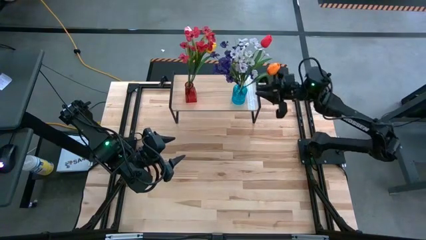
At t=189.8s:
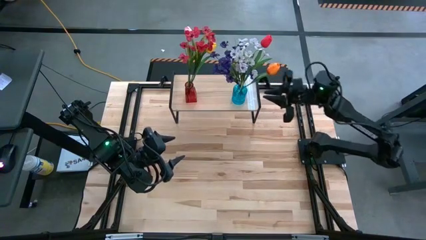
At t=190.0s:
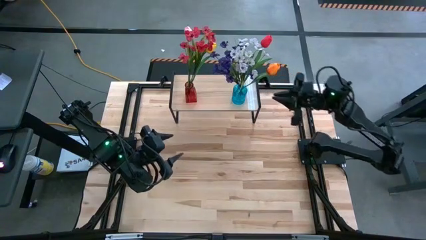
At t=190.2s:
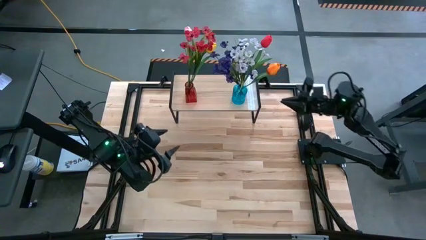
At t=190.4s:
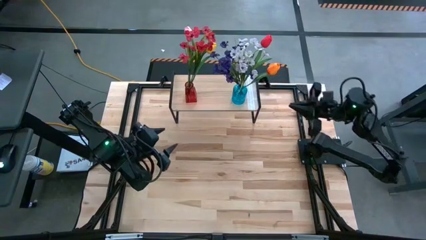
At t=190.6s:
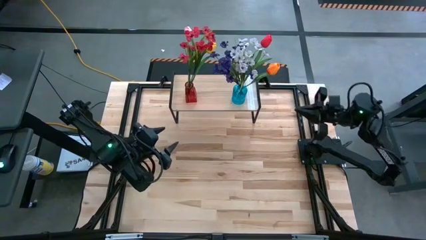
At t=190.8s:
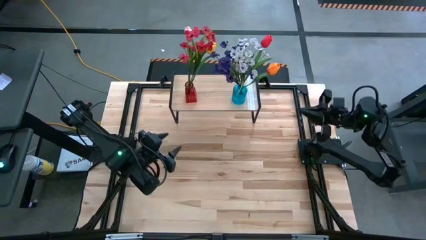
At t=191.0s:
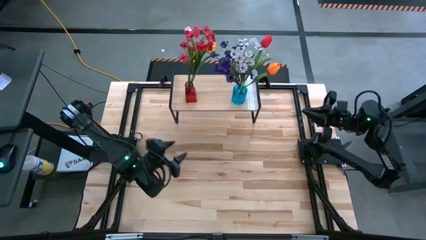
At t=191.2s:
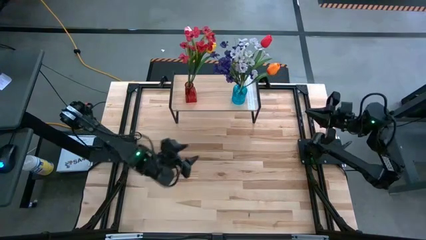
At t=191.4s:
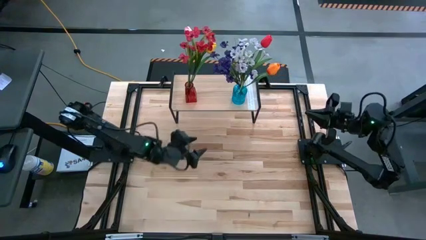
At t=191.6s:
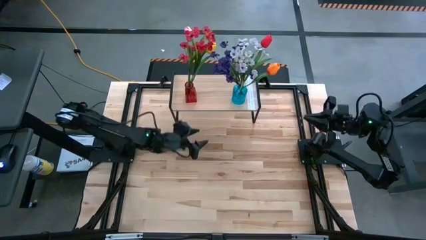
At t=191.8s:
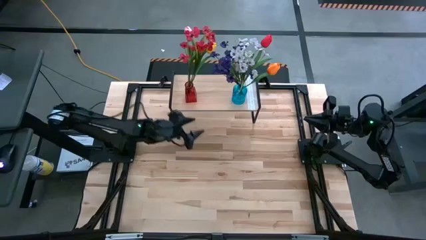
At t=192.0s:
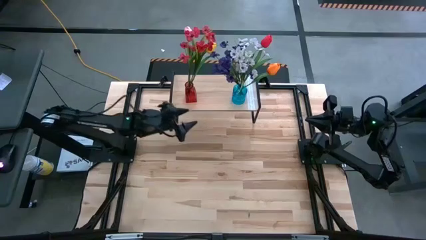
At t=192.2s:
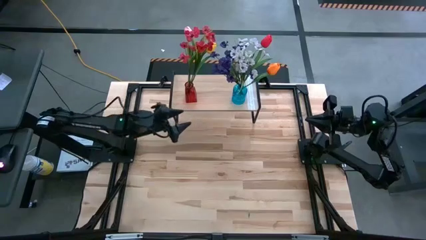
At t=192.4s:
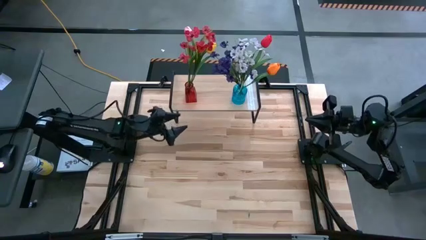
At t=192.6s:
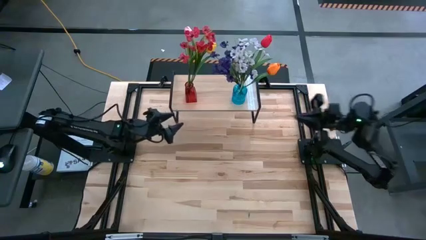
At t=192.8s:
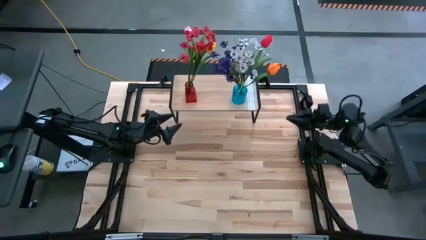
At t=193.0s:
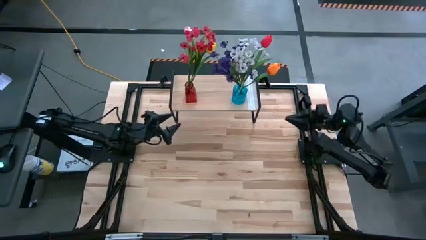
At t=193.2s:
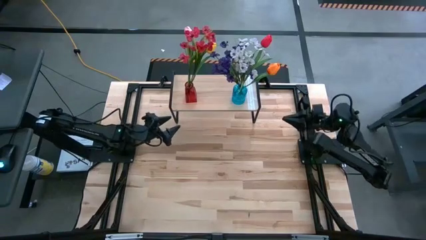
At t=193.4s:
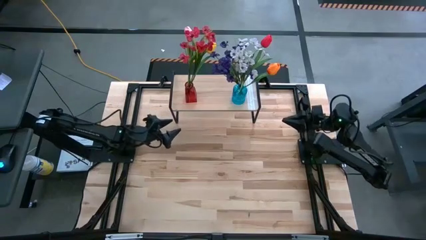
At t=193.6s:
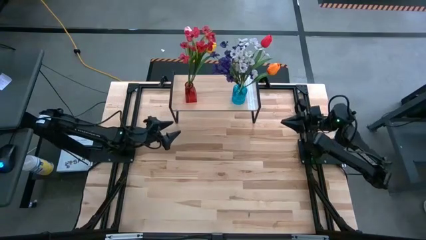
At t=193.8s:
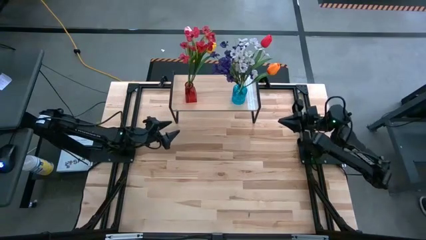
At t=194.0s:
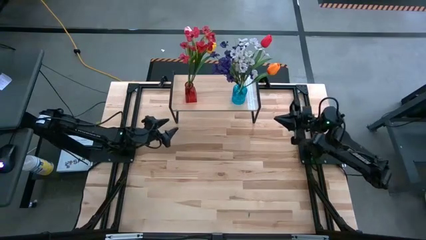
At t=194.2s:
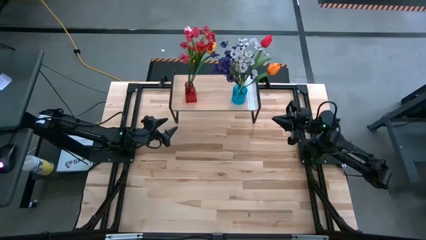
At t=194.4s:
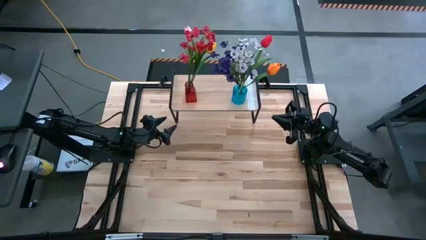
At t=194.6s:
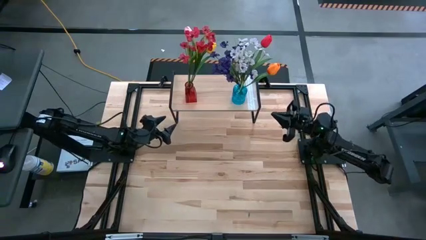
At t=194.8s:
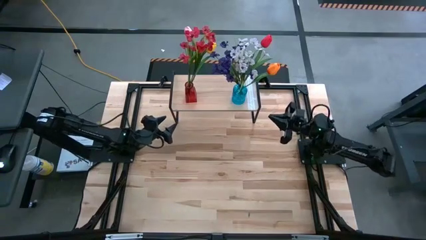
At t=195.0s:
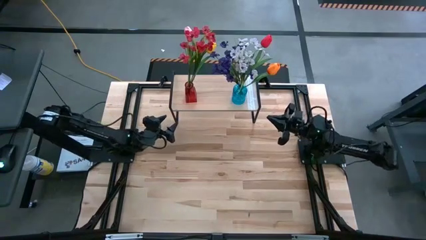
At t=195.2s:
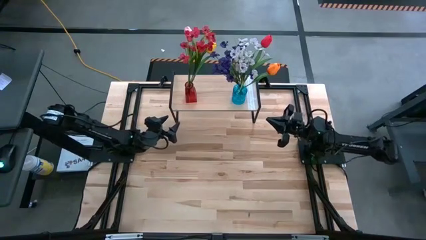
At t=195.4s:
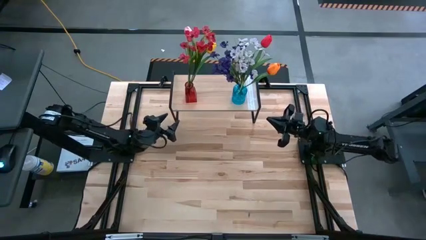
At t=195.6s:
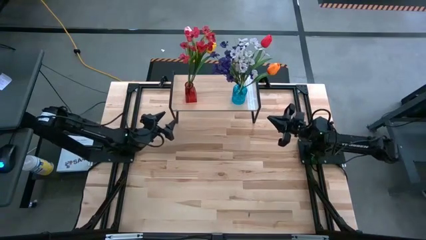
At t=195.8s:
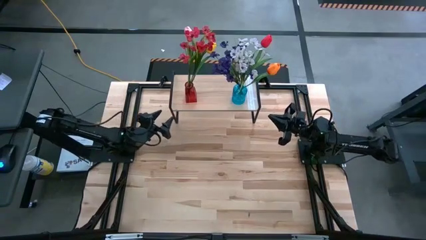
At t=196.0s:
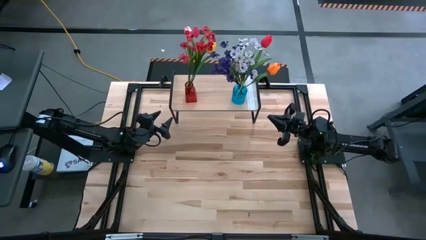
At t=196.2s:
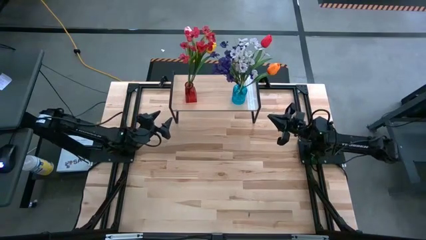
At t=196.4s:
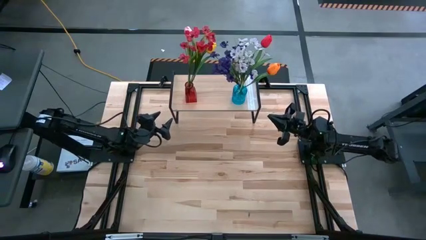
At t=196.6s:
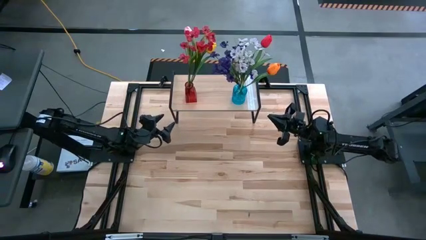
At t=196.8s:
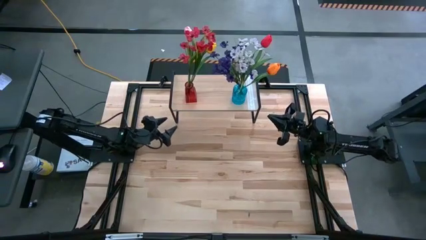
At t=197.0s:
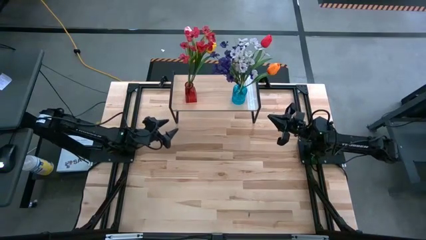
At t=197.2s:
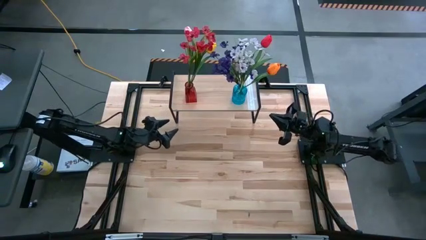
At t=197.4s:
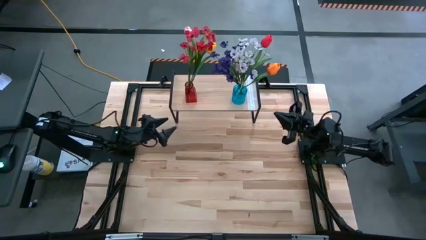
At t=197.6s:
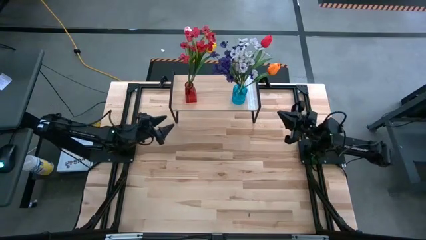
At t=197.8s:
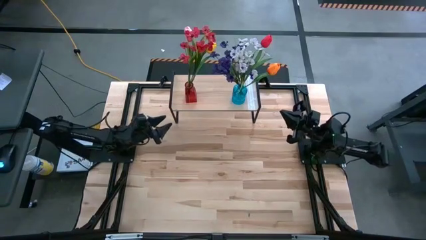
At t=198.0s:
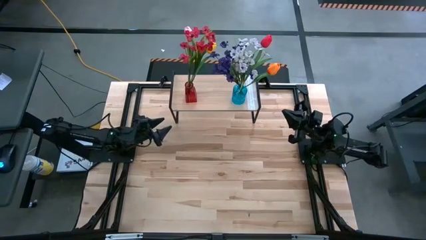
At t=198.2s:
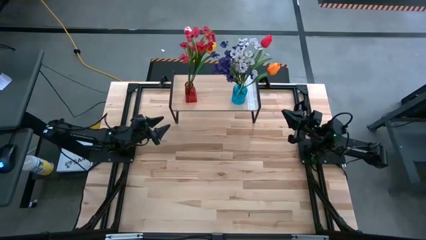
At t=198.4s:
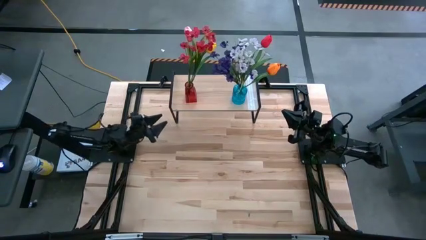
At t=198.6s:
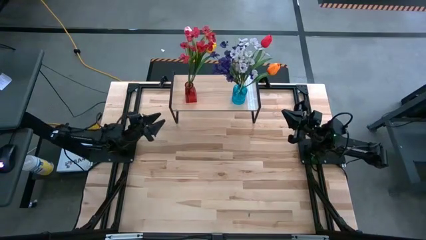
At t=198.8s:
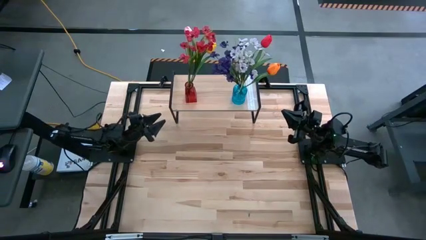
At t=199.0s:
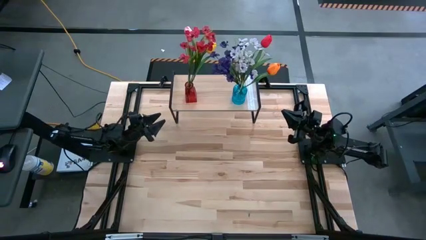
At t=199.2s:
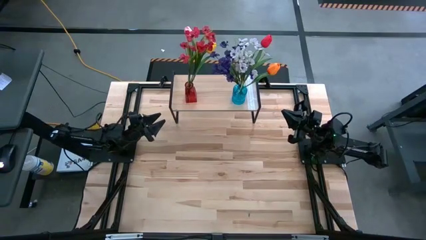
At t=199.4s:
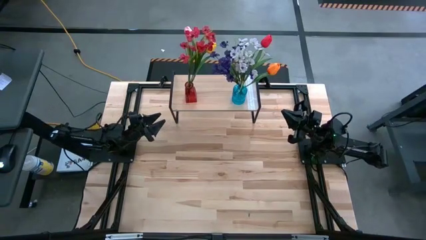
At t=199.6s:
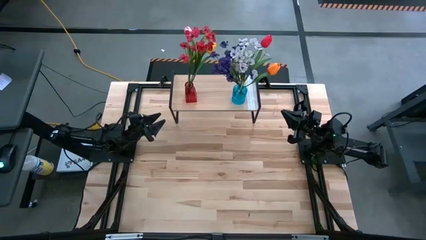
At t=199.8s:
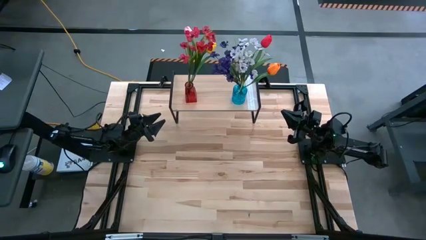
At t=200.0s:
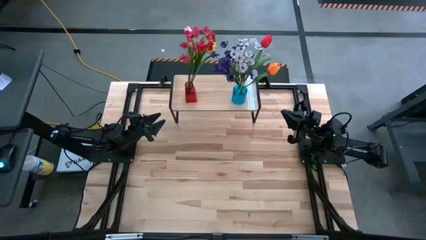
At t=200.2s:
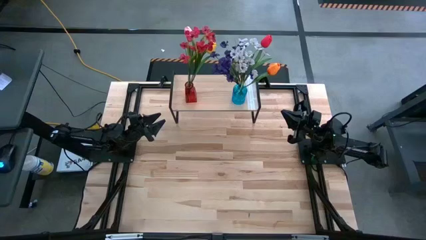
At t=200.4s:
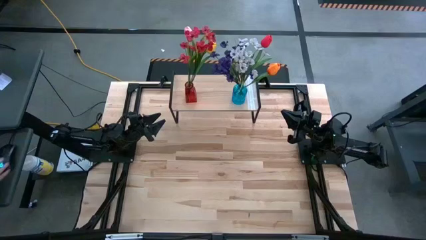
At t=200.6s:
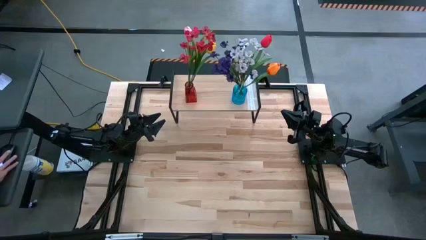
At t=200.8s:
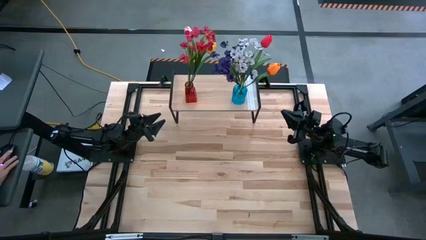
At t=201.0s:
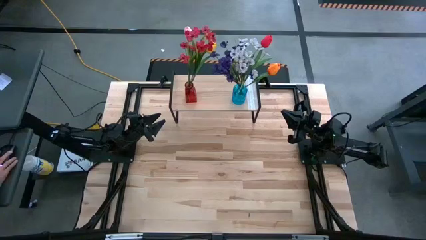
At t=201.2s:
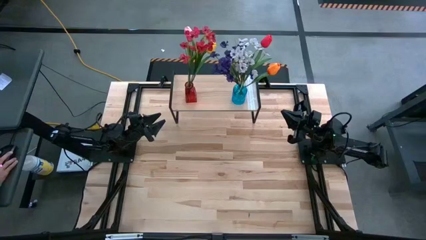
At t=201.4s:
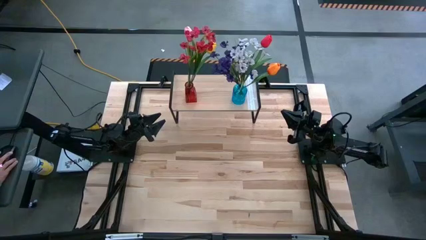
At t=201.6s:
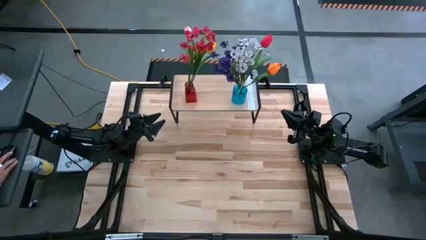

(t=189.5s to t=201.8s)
Task: Pick and place flowers into a vace then onto a shelf
Return to home position
